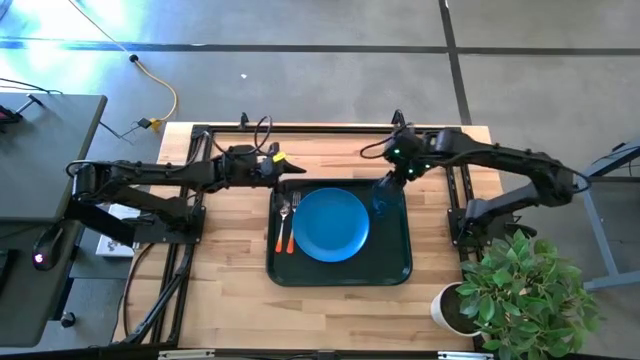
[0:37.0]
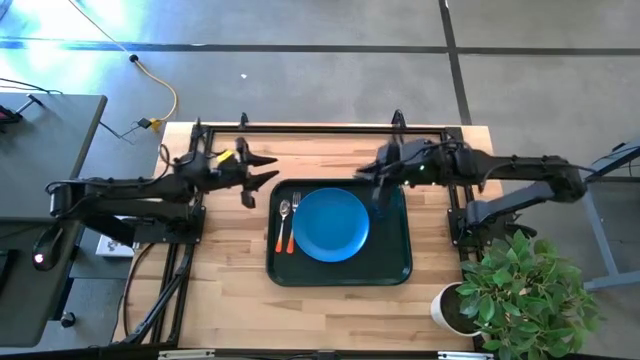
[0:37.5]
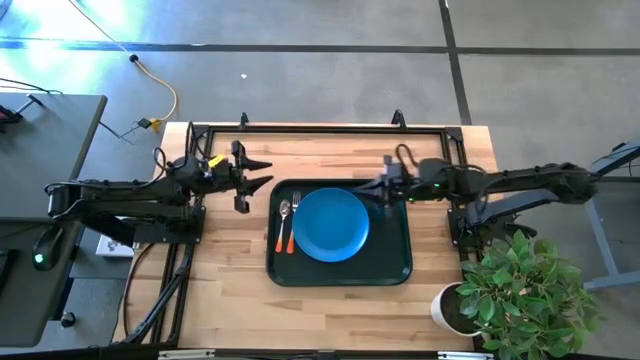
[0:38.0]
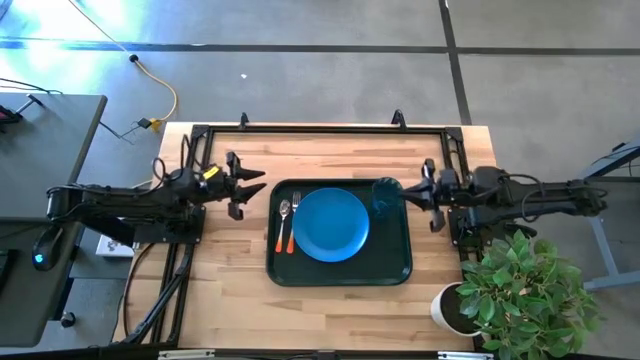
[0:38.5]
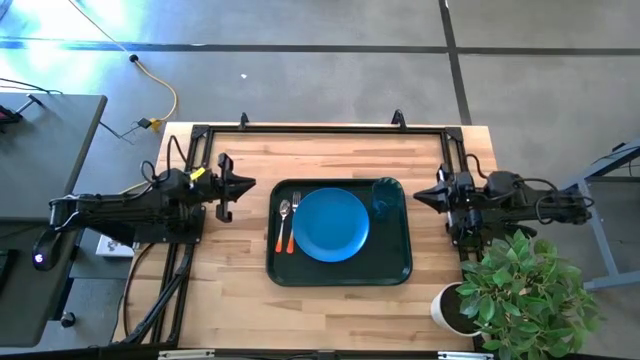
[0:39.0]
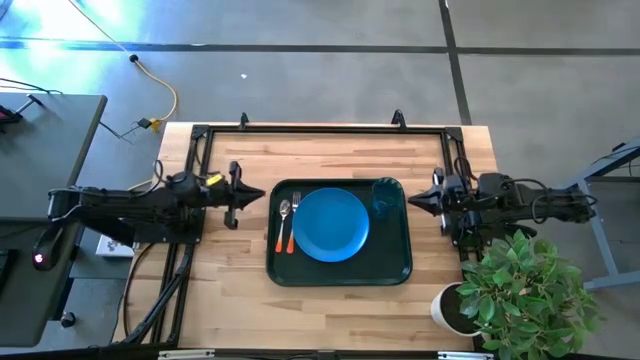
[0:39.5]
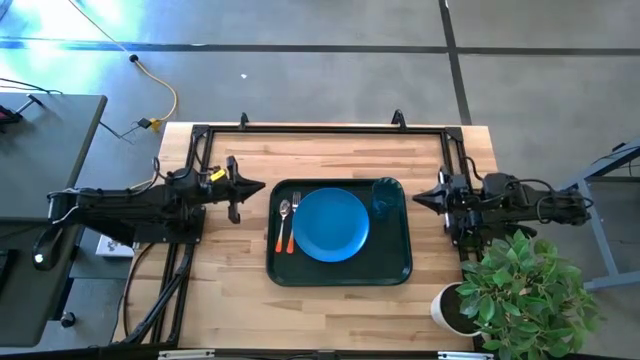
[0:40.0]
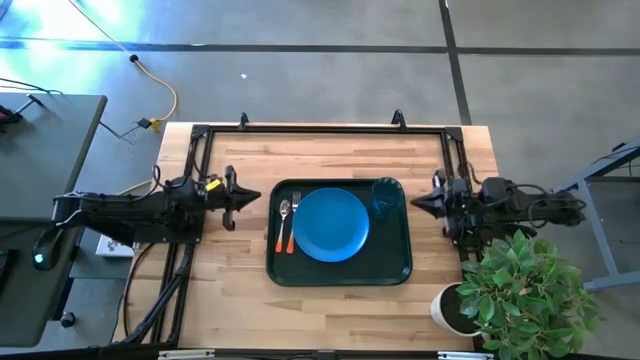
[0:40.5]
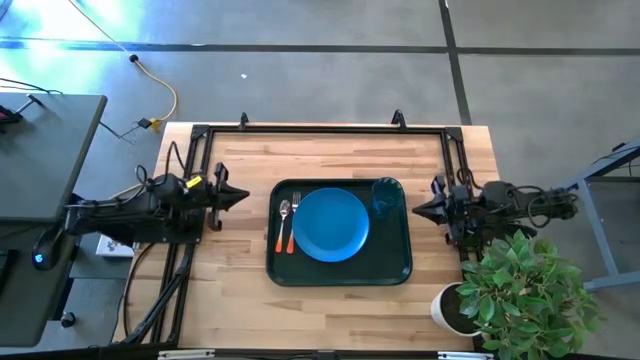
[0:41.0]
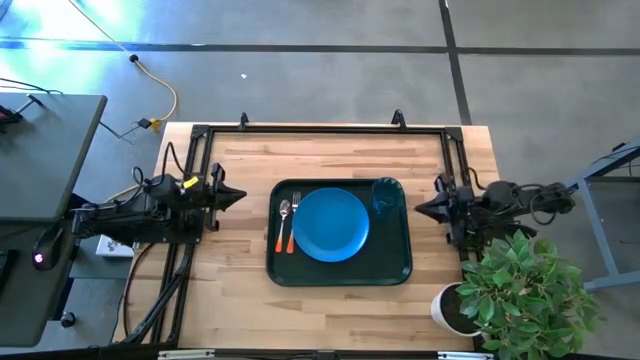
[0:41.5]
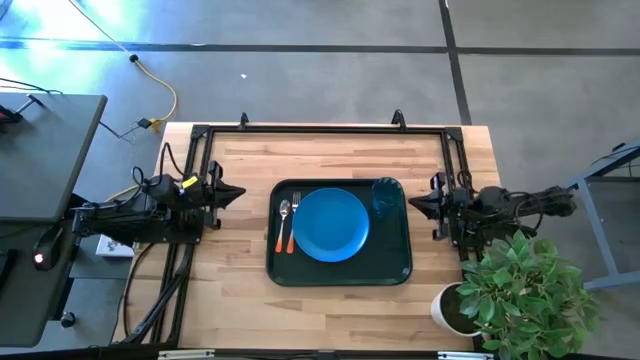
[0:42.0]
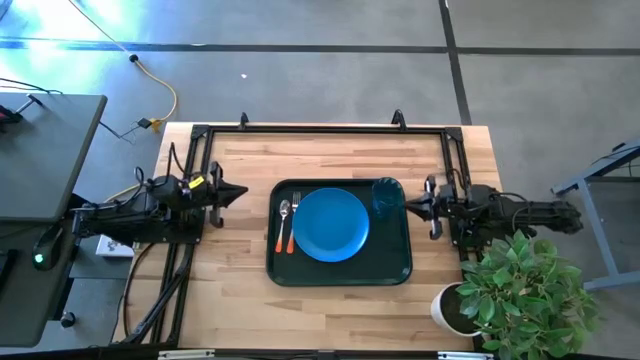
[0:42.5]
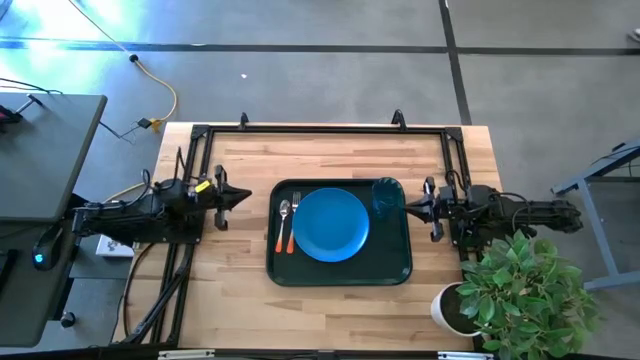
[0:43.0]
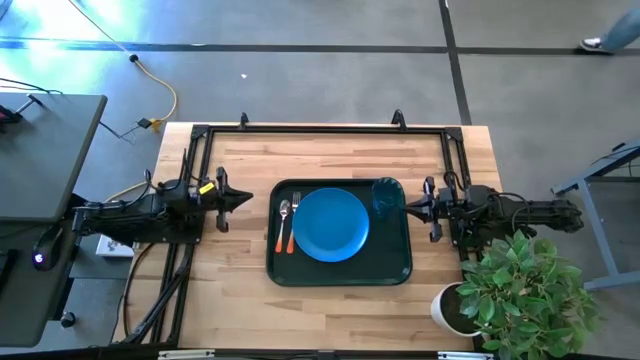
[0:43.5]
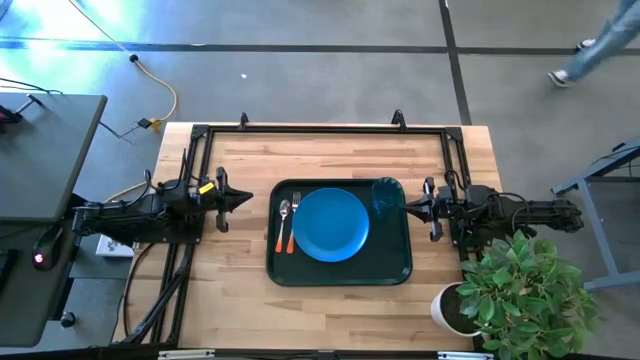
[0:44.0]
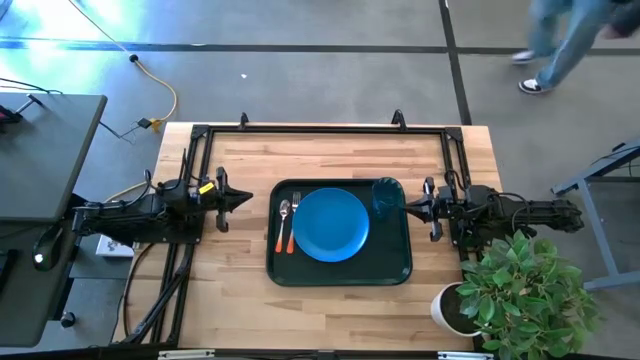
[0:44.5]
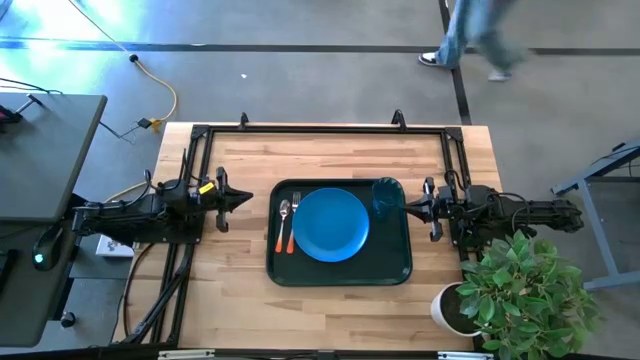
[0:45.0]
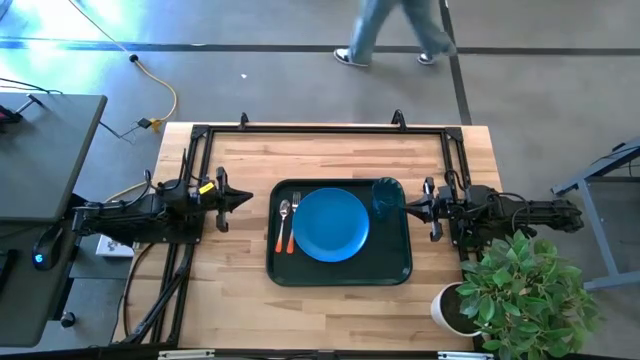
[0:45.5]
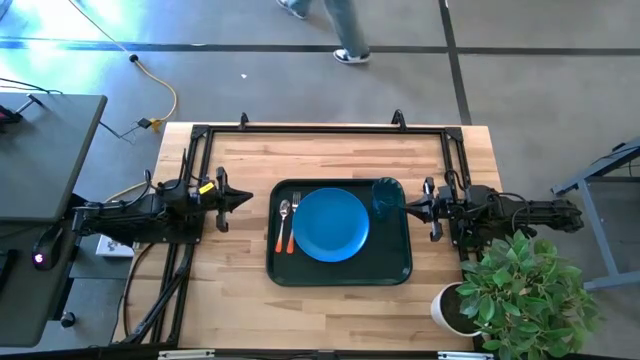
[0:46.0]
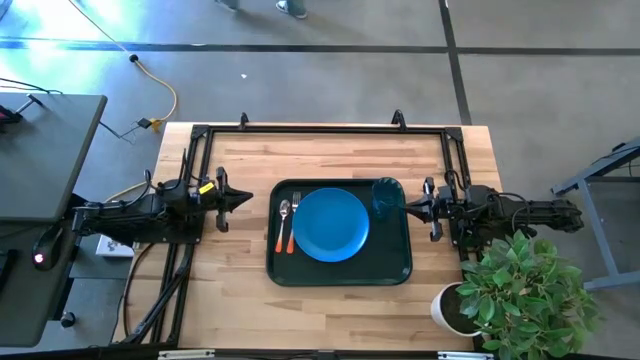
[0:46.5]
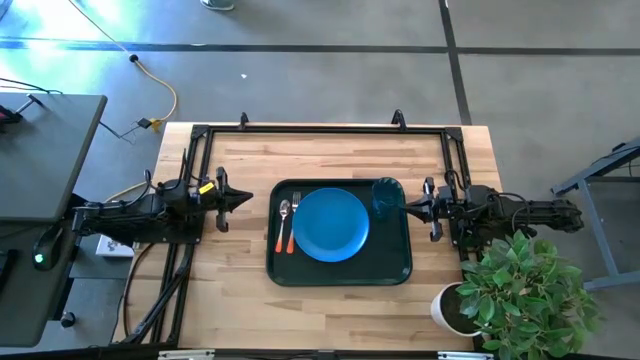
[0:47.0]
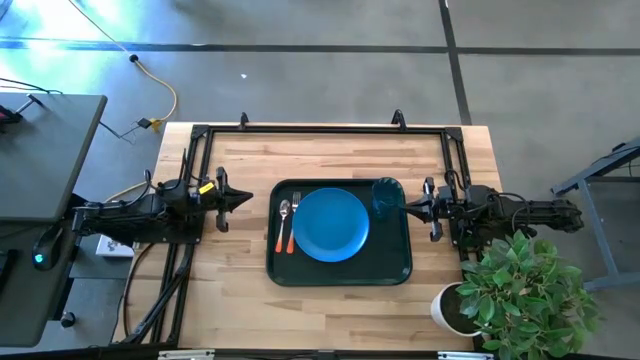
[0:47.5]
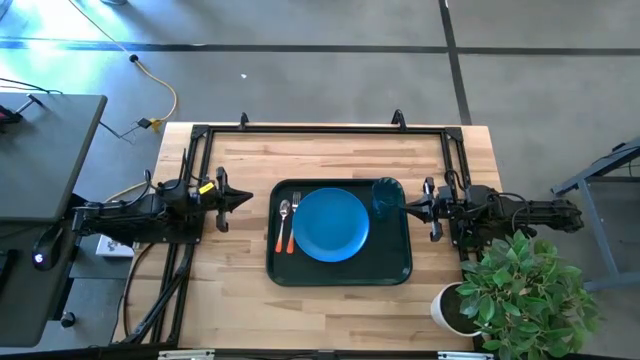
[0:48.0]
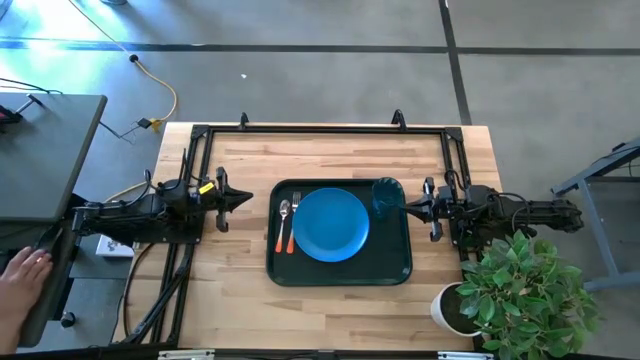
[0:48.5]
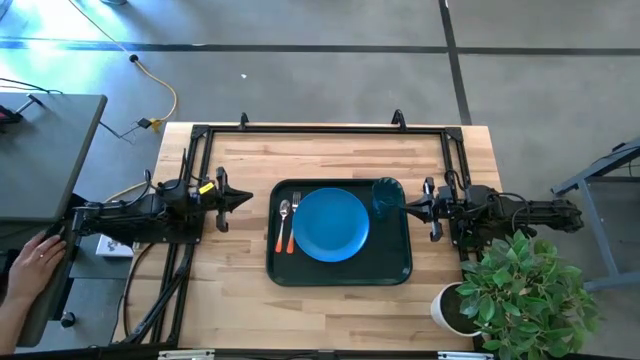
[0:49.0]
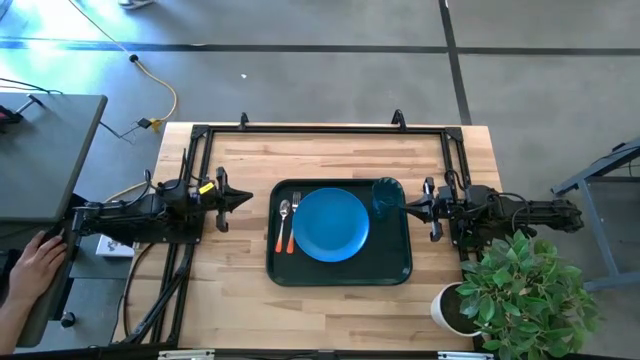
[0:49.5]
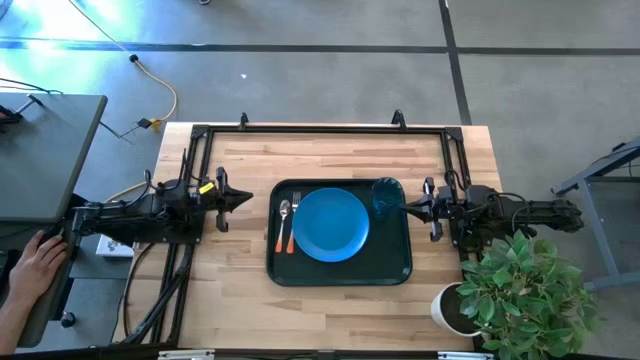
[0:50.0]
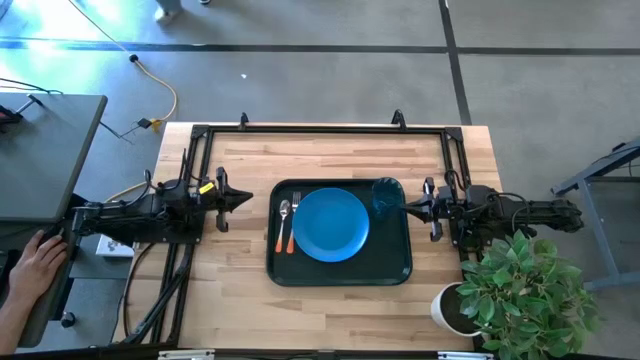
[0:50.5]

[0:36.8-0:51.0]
Task: Pick and place plate/cup/fork/spoon on tray
Return to Home Position

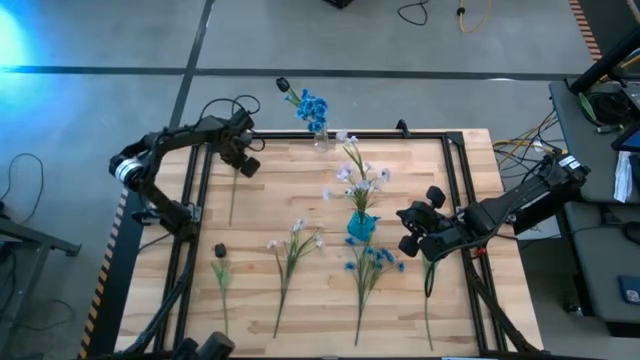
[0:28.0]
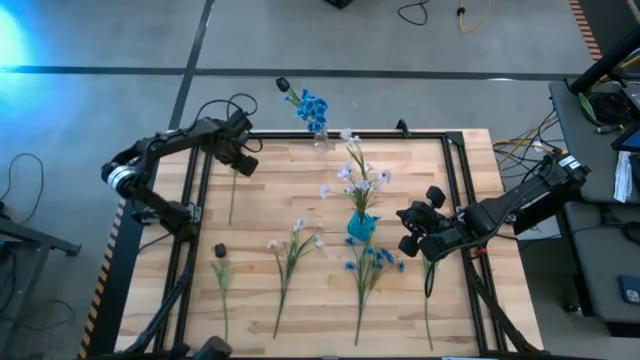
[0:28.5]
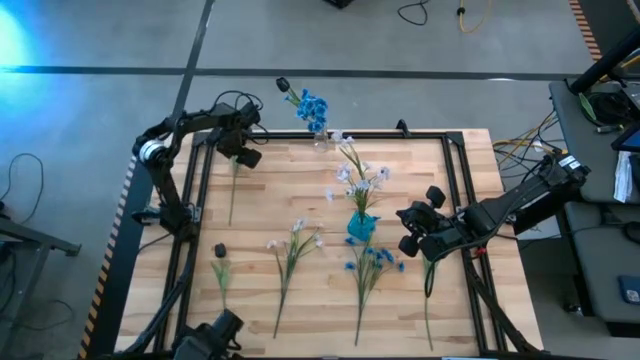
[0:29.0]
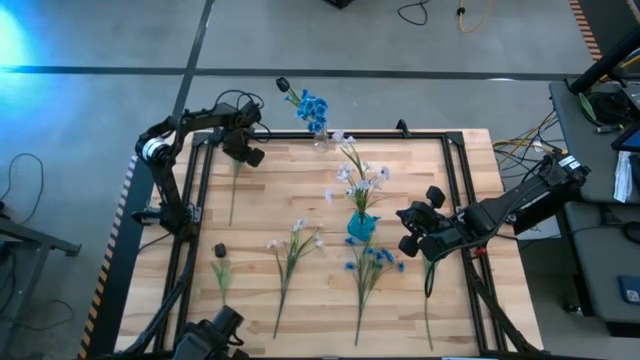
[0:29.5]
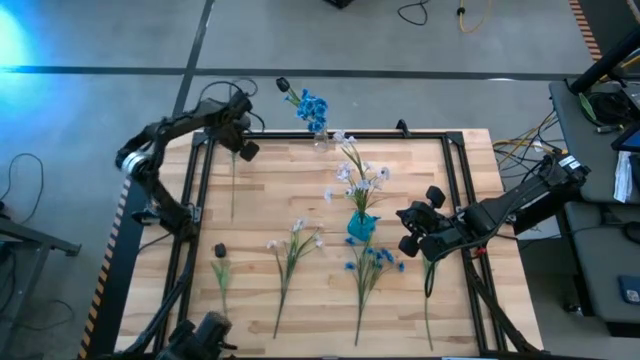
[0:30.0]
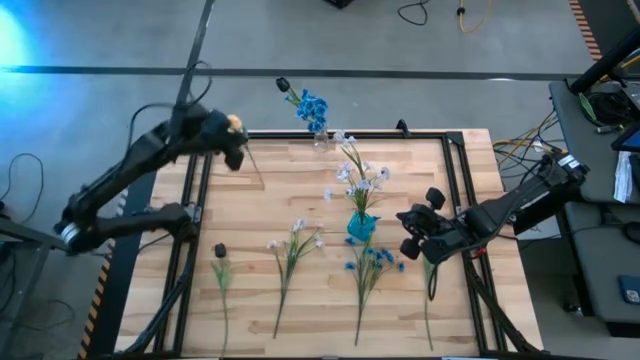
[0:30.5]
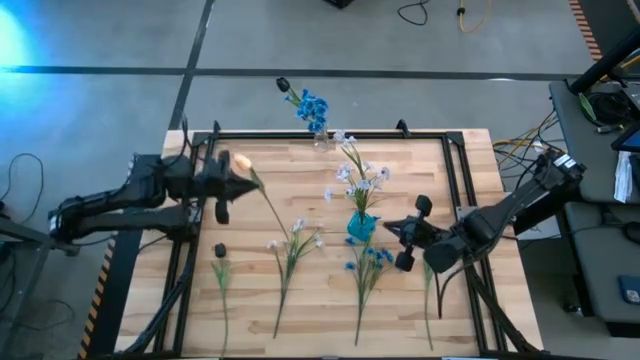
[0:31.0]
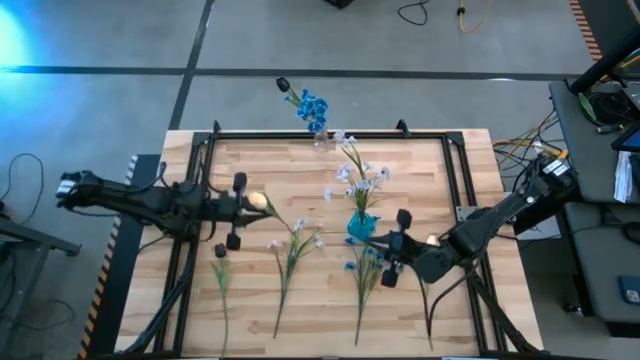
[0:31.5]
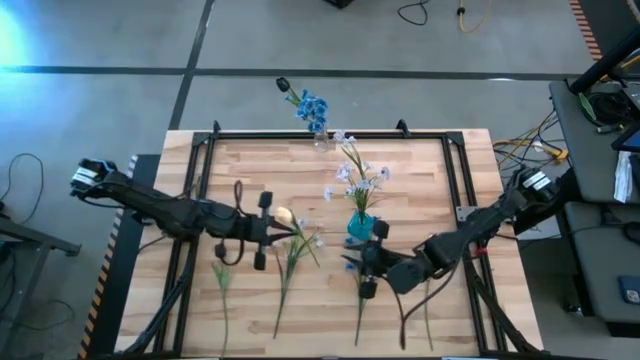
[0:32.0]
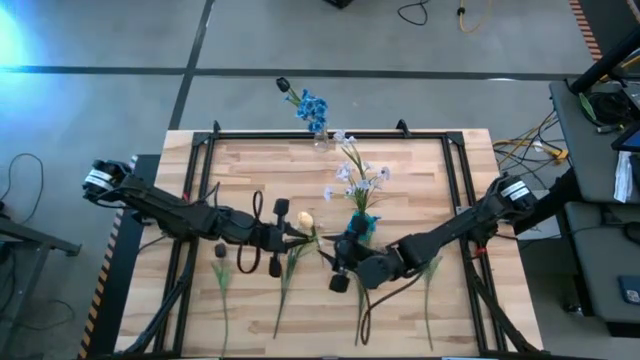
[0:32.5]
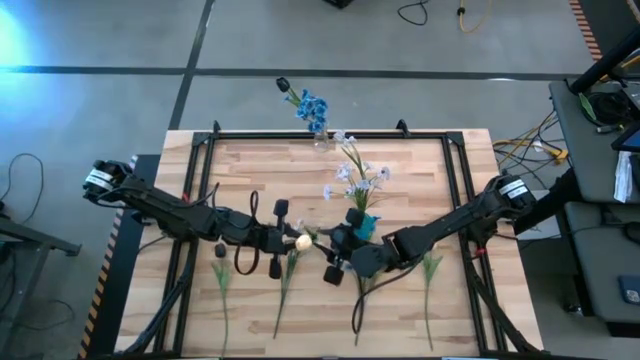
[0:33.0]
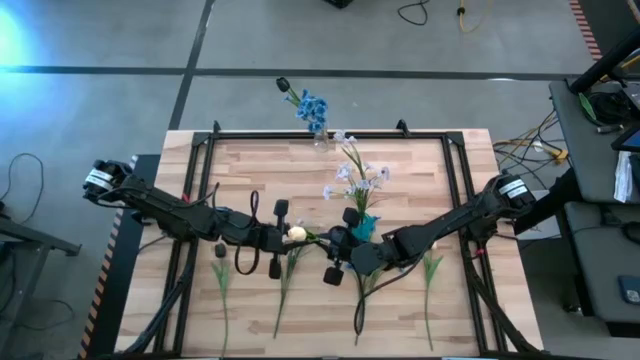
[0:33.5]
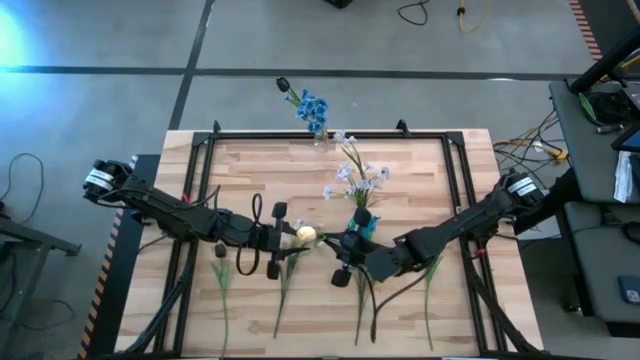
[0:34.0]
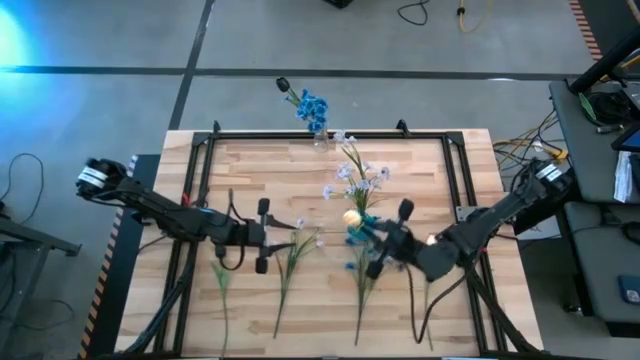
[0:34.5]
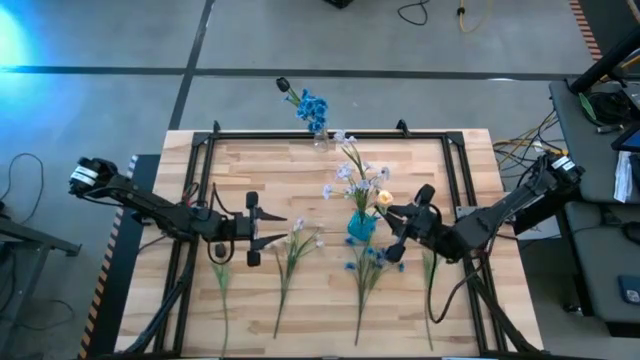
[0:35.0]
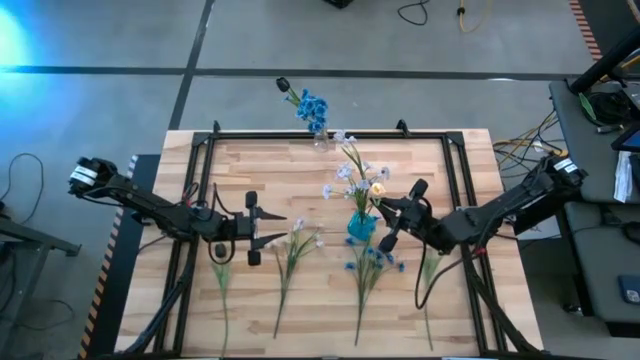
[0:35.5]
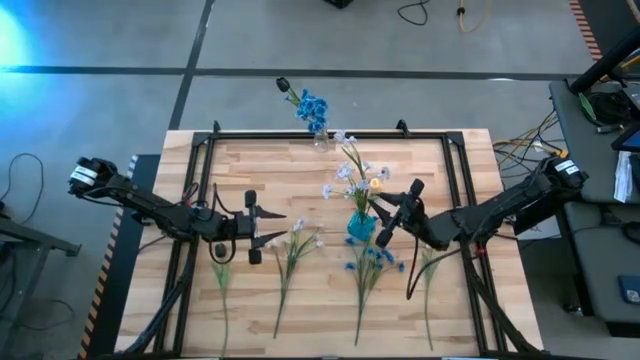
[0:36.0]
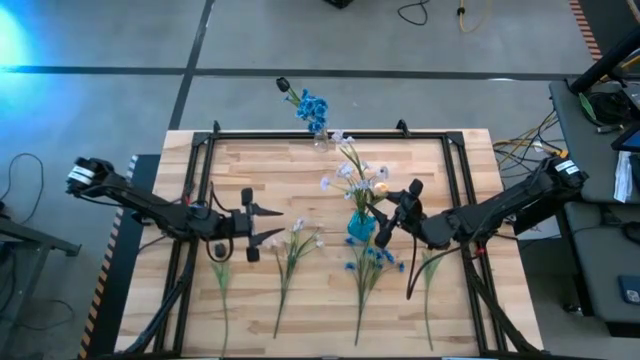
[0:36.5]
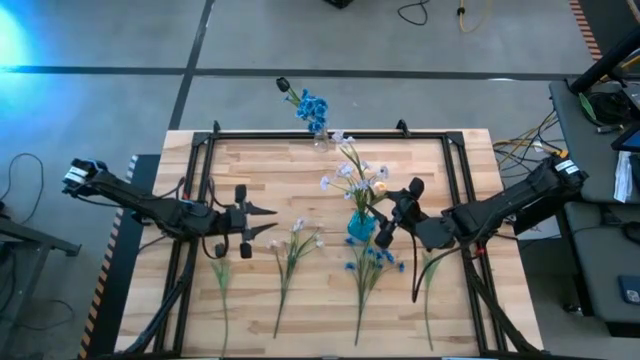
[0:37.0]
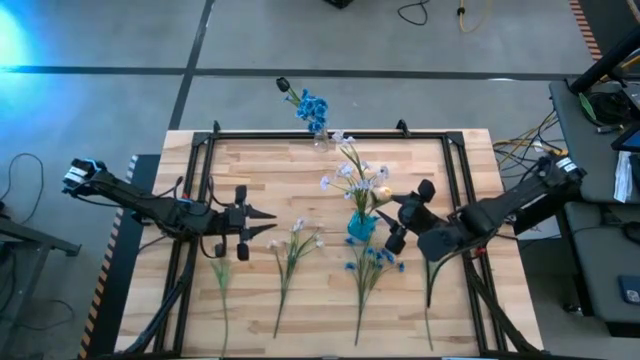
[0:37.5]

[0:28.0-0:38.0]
Task: Sort flowers into vase by color
Put the top white tulip into the blue vase
